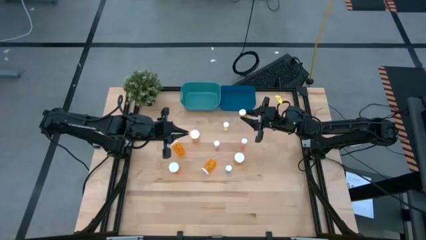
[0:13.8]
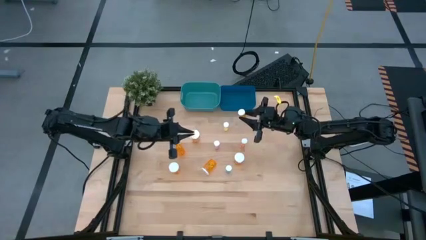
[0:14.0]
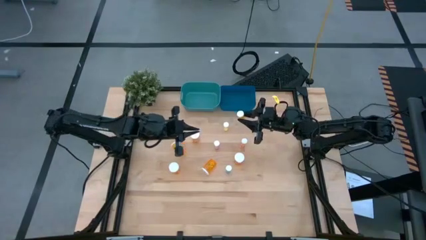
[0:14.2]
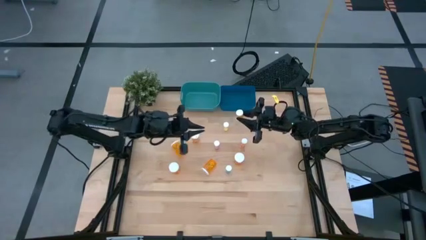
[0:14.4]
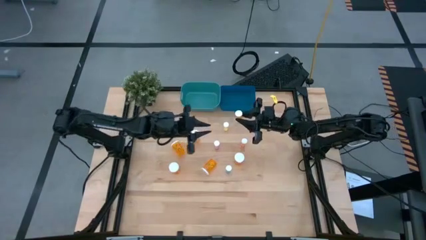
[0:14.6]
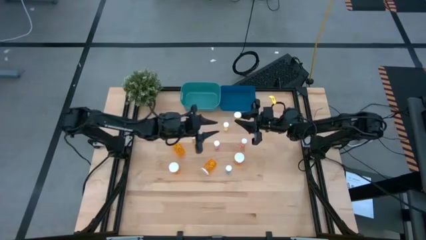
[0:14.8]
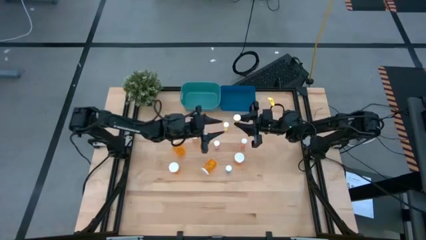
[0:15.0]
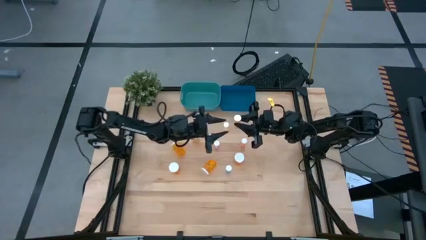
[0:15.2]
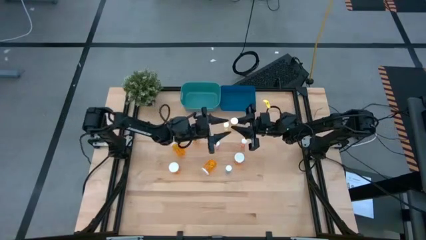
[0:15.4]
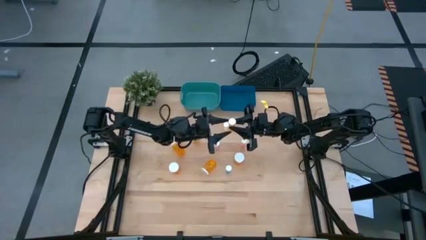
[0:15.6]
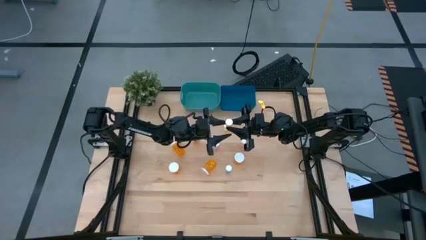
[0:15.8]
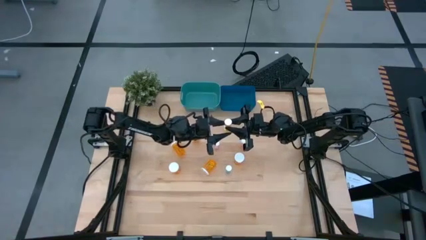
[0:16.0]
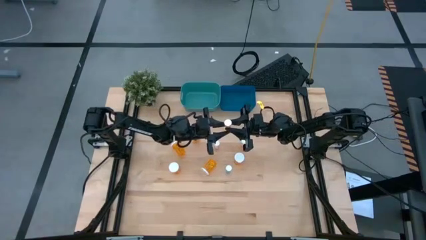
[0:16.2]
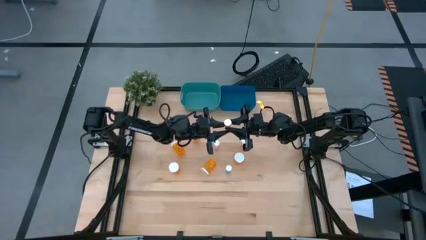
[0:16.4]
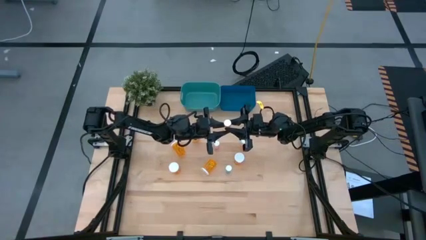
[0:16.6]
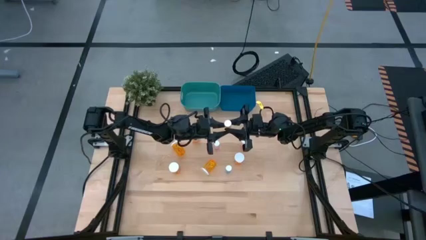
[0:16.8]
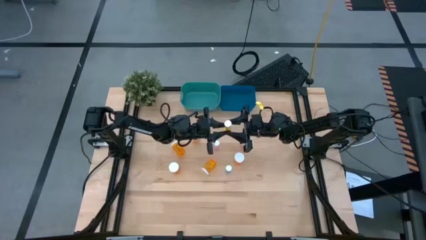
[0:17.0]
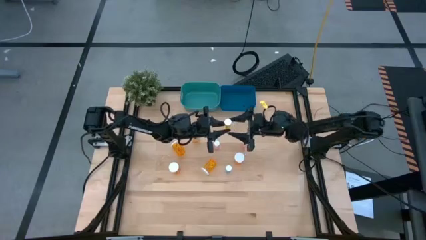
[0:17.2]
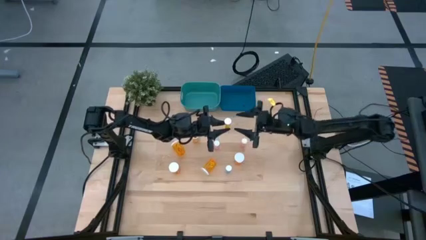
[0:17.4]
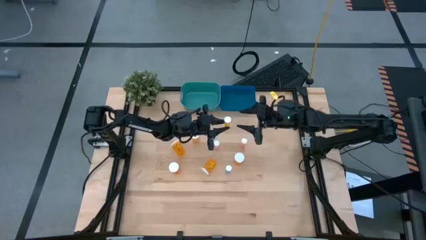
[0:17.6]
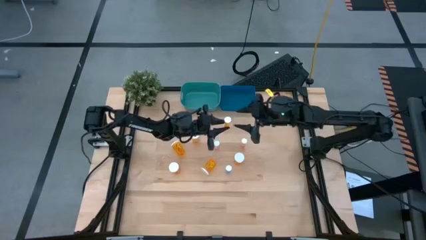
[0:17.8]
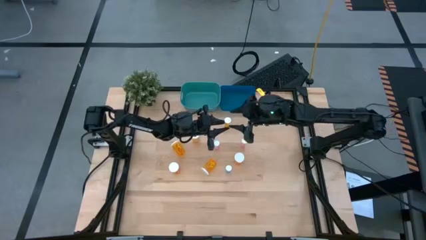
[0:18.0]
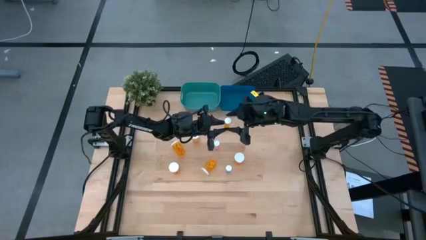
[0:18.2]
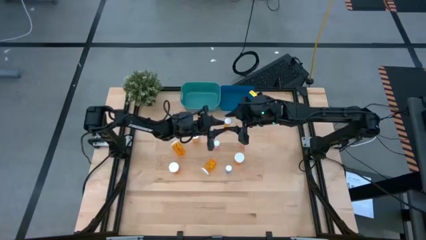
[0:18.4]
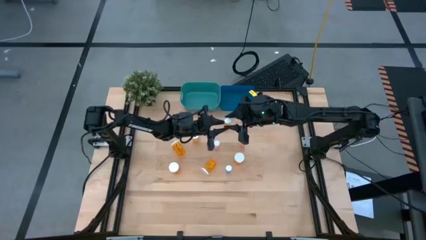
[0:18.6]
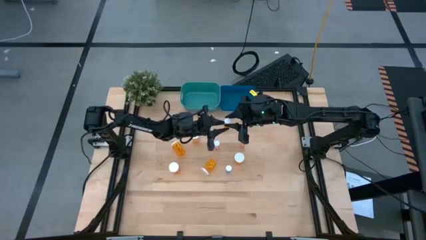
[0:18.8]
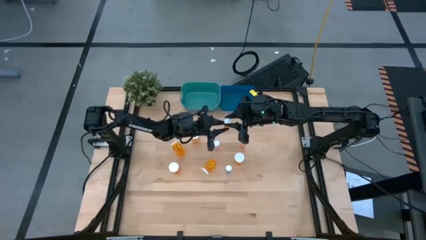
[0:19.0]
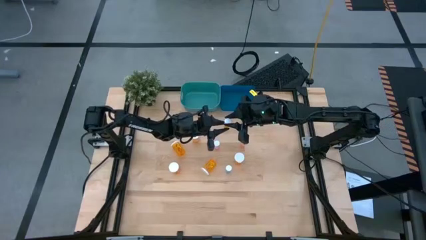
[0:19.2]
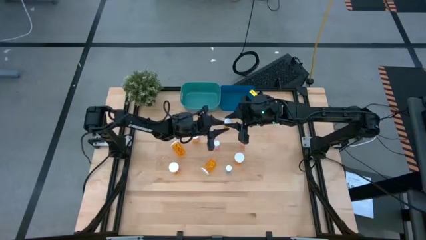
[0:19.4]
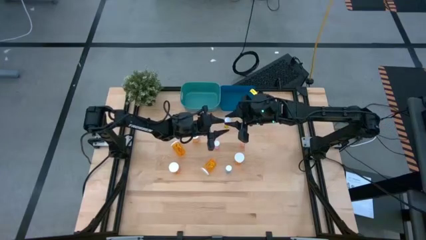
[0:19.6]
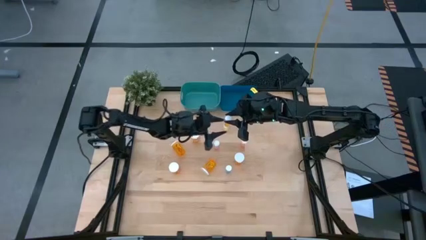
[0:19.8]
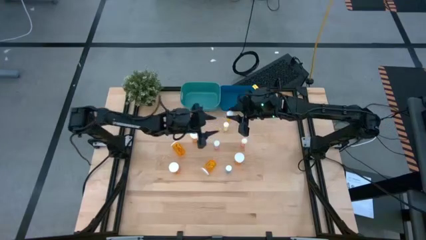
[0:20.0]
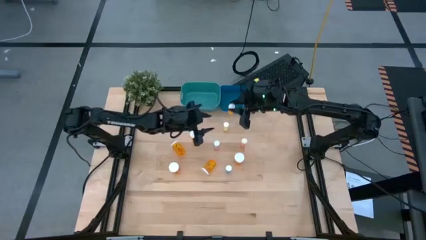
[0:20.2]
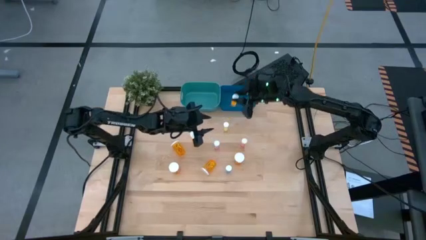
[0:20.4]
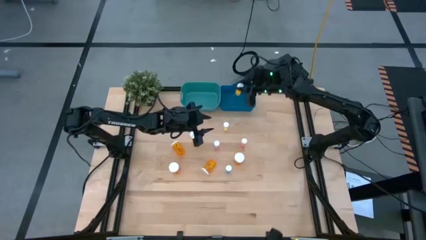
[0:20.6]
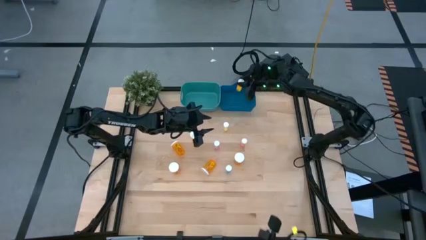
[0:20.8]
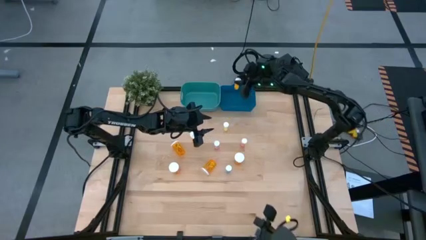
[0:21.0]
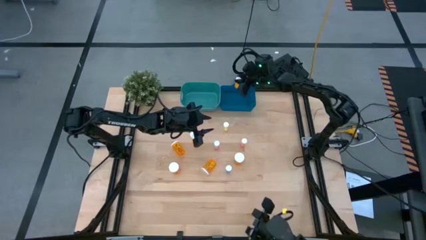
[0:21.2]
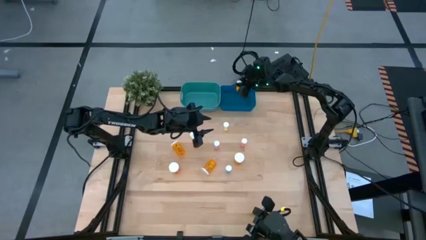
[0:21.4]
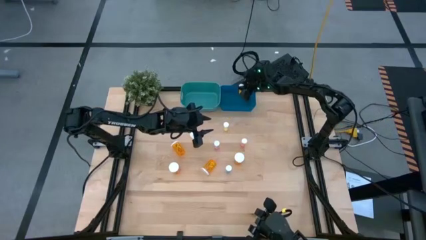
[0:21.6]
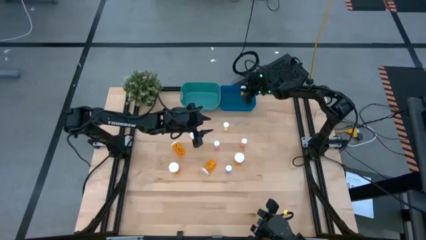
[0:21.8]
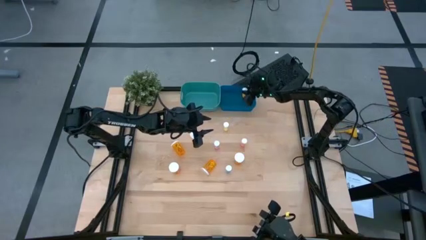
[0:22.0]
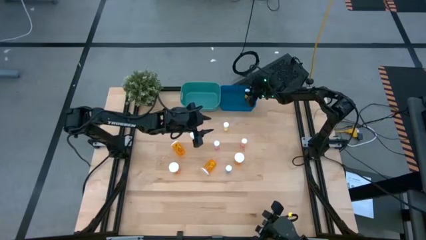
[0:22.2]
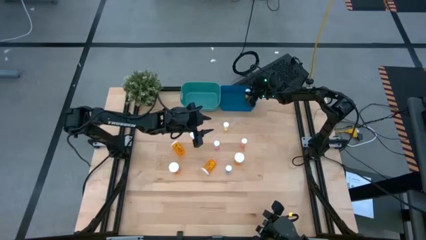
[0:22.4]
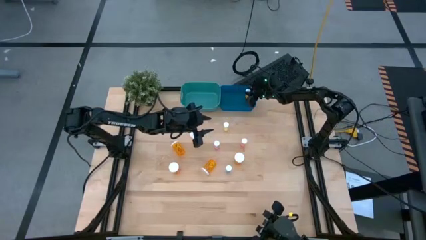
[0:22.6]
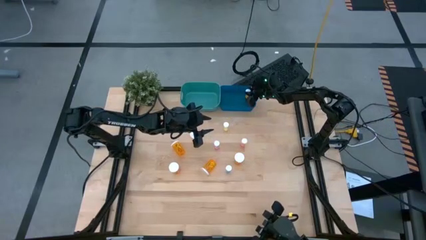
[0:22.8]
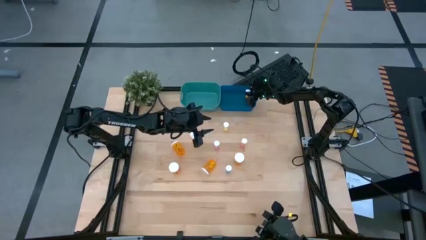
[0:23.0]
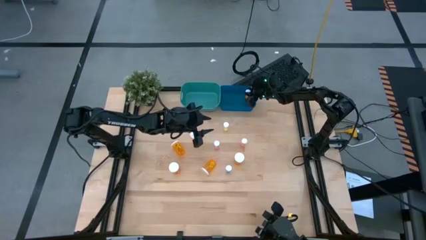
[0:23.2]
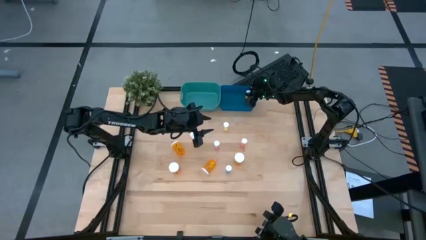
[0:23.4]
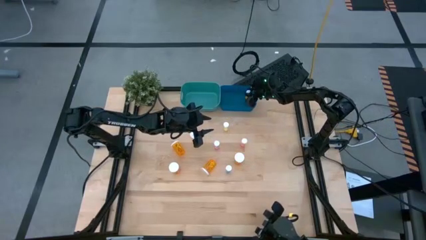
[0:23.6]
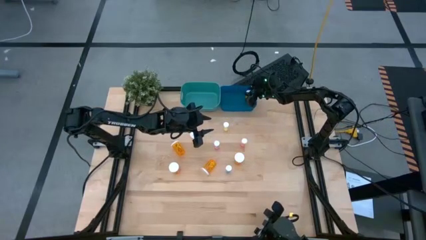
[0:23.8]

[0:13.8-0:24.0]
Task: Pick and place medicine bottles into bin by pill shape (circle, oval)
Put the small orange tablet bottle into the blue bin

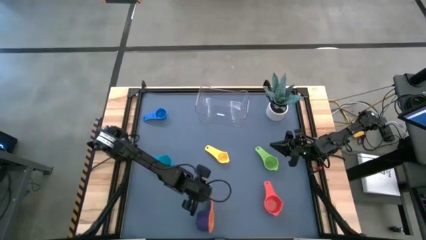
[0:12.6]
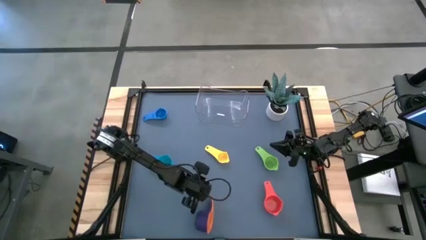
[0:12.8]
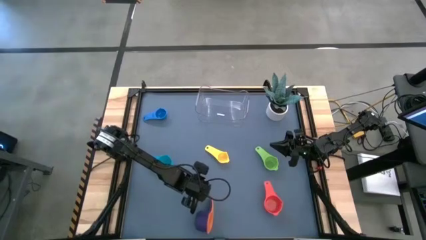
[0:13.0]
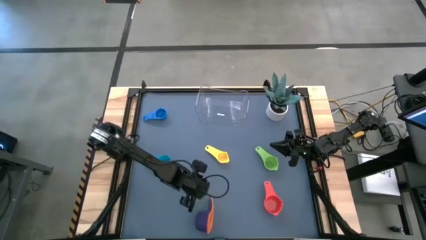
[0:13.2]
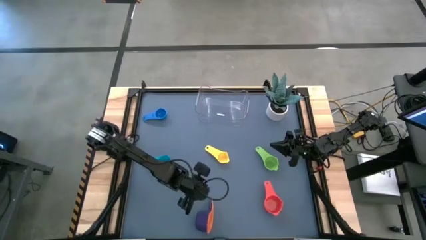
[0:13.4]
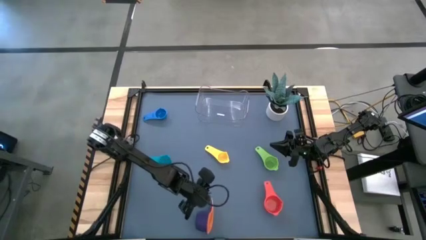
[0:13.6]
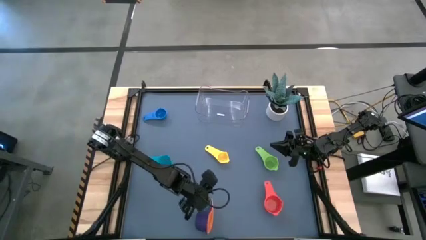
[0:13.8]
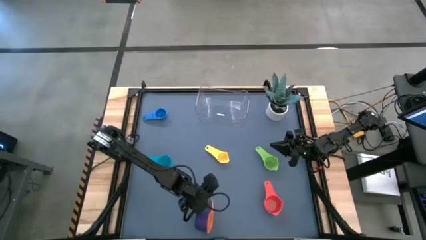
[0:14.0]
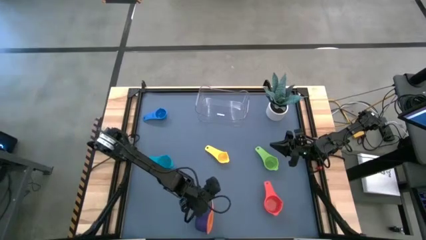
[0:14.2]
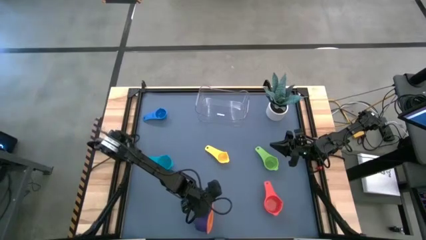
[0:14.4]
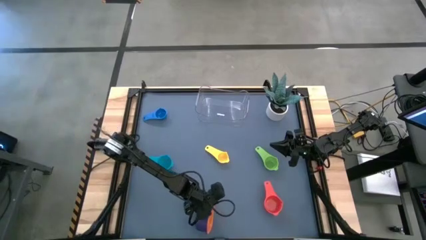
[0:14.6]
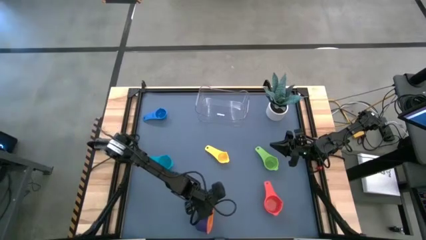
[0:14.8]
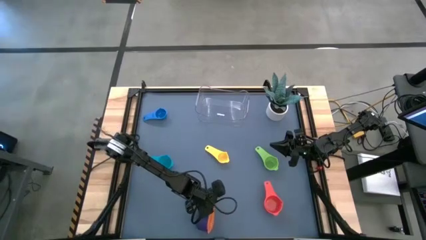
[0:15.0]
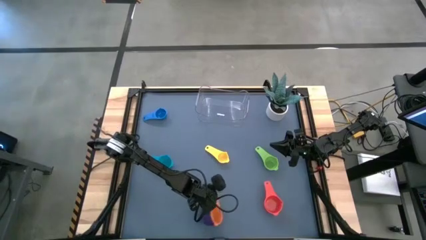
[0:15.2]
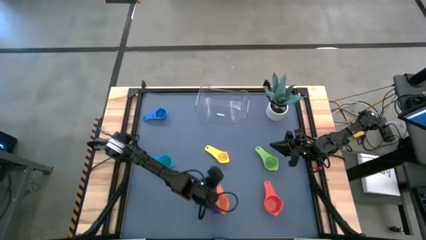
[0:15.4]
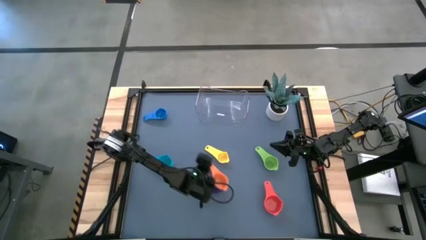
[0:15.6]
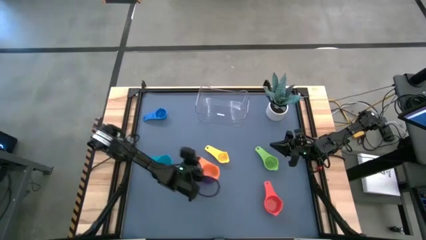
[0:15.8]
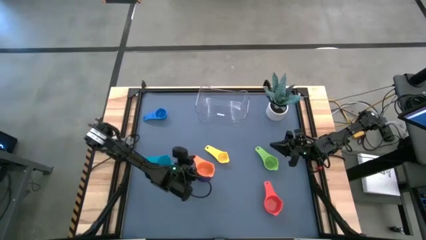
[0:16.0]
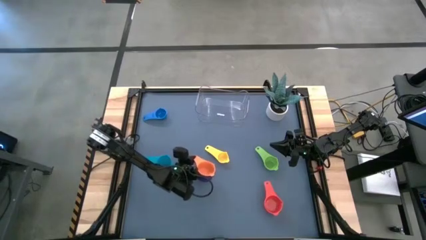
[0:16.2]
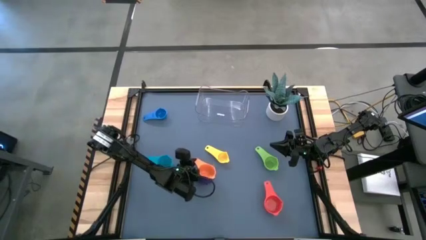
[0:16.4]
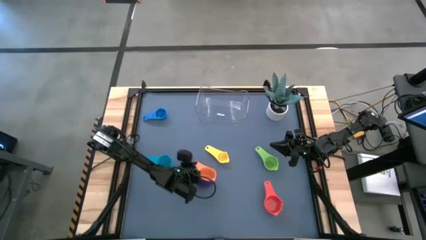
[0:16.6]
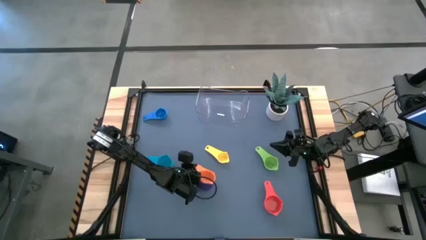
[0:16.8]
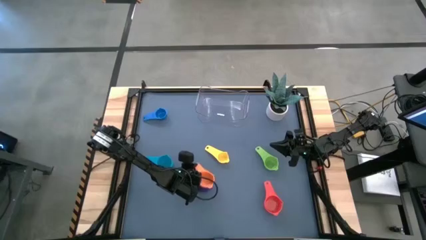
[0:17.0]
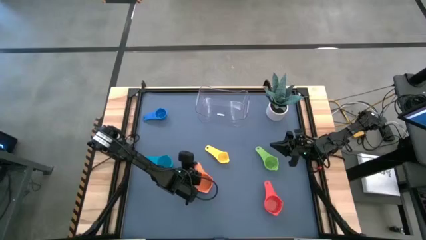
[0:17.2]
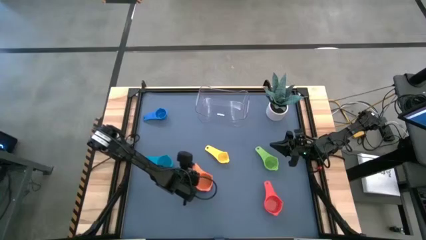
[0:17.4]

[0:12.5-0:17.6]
Task: Nest measuring cups in basket
Move the stacked measuring cups to the center of the table
